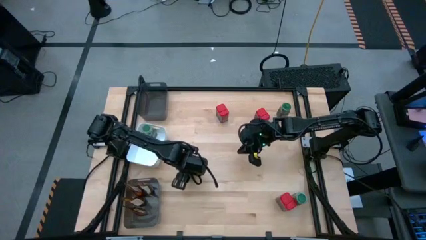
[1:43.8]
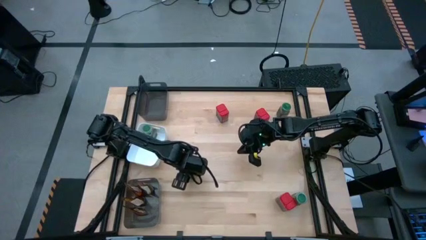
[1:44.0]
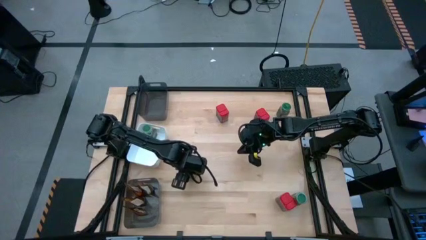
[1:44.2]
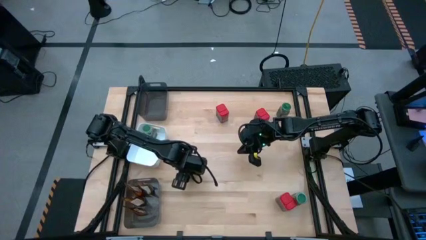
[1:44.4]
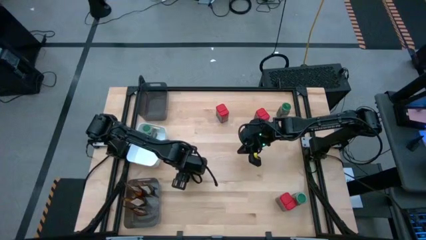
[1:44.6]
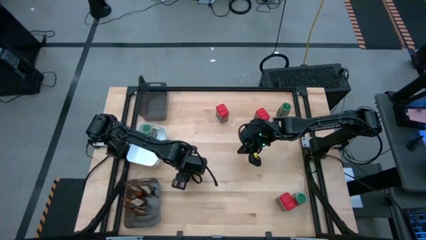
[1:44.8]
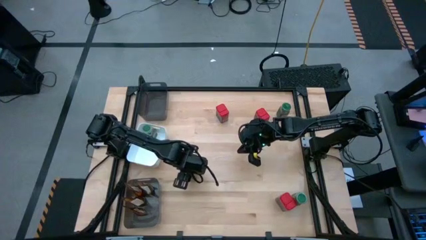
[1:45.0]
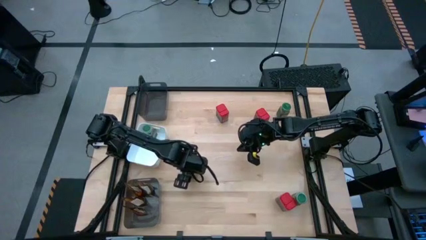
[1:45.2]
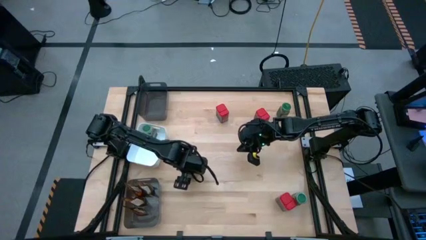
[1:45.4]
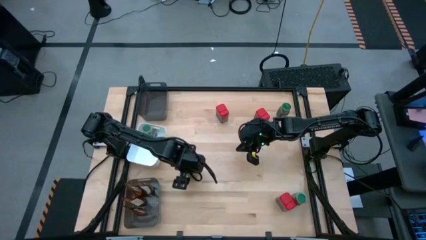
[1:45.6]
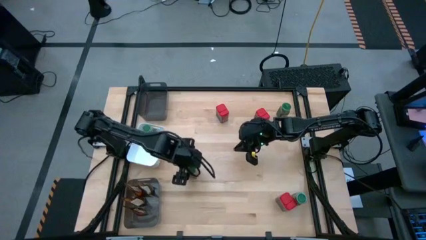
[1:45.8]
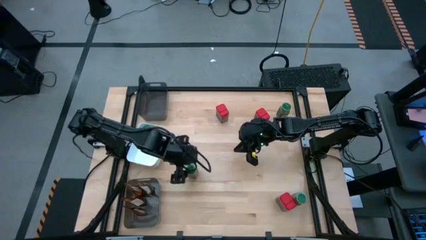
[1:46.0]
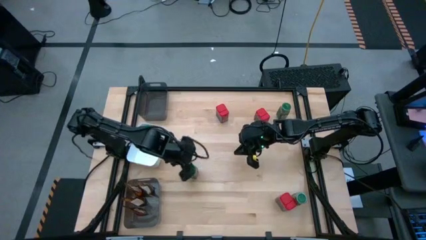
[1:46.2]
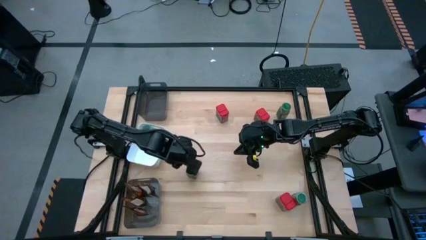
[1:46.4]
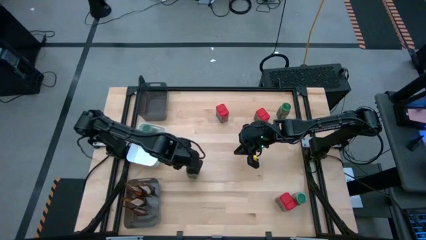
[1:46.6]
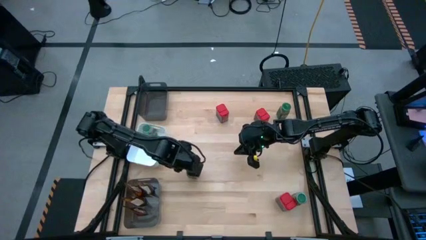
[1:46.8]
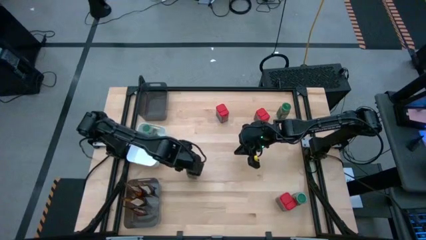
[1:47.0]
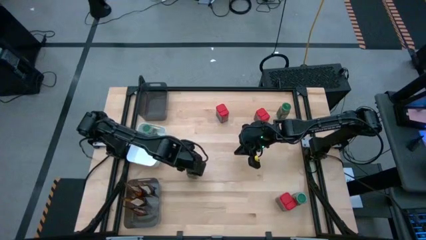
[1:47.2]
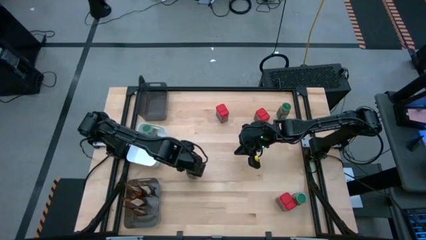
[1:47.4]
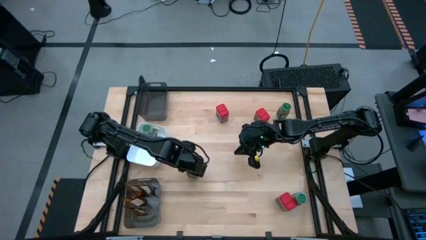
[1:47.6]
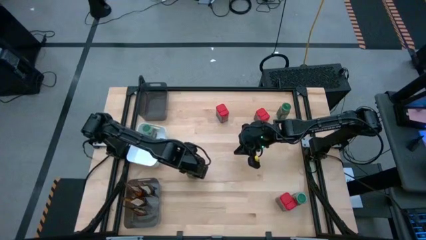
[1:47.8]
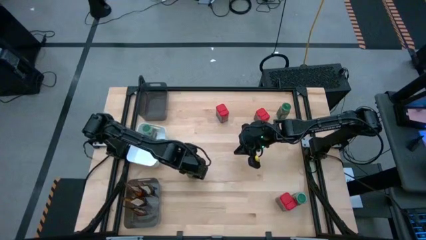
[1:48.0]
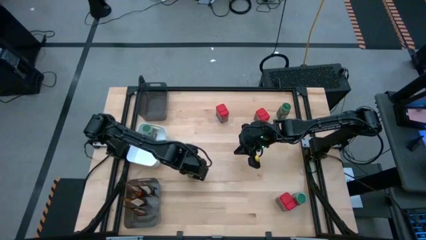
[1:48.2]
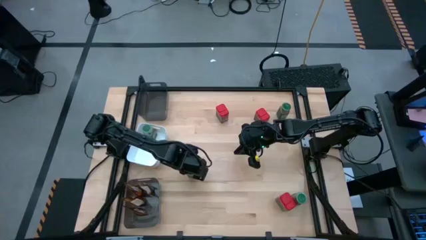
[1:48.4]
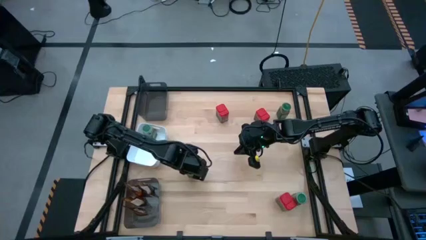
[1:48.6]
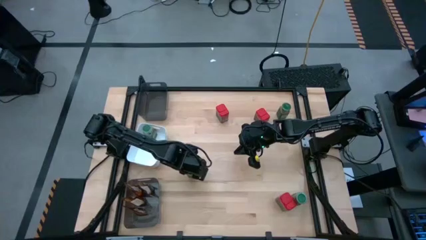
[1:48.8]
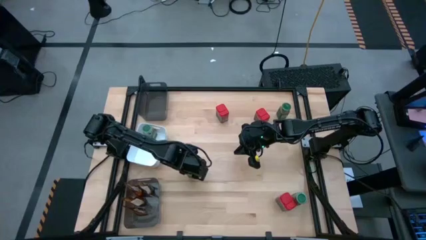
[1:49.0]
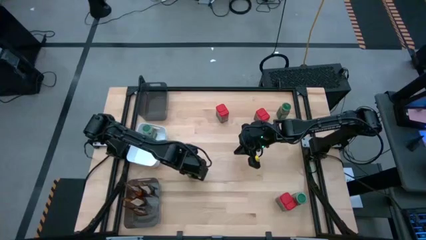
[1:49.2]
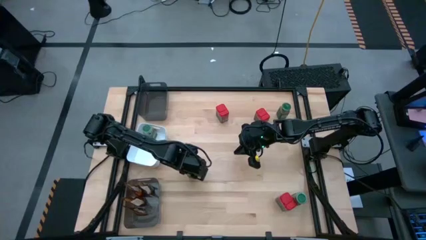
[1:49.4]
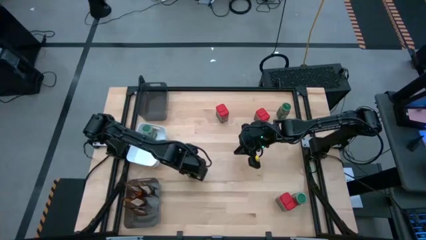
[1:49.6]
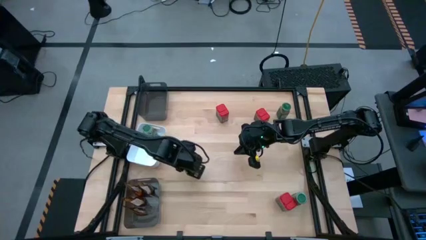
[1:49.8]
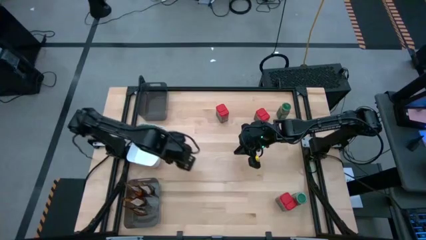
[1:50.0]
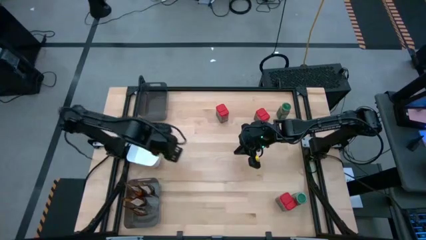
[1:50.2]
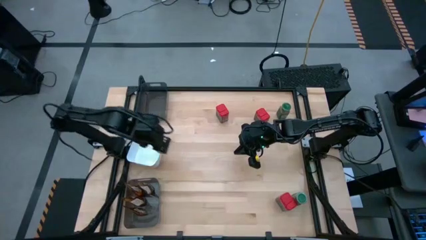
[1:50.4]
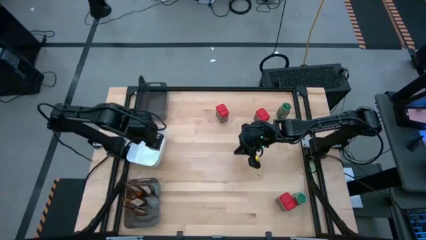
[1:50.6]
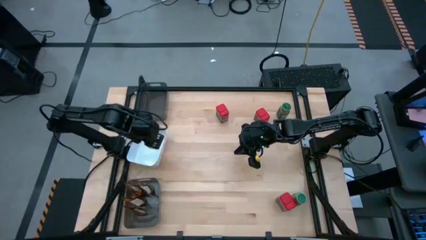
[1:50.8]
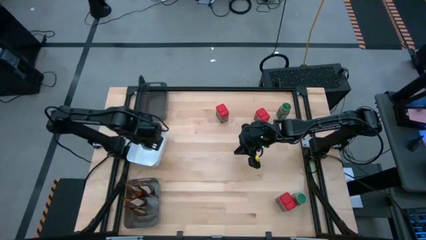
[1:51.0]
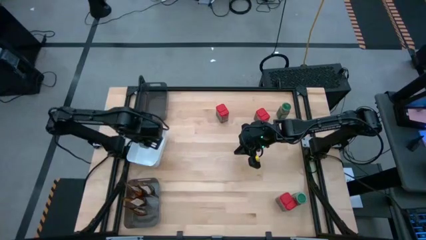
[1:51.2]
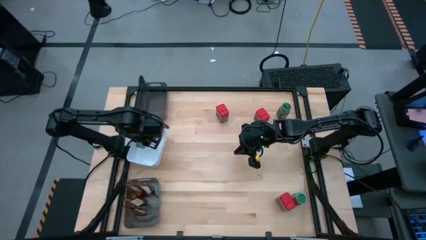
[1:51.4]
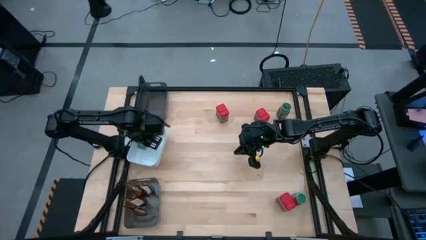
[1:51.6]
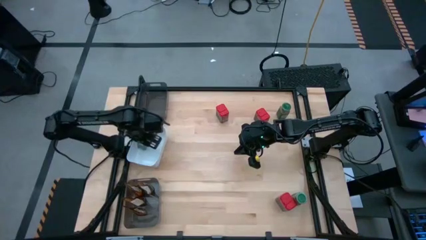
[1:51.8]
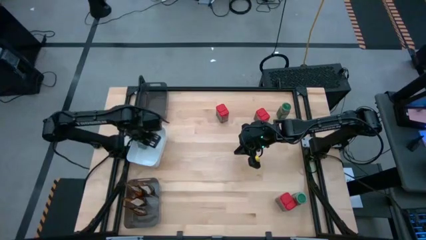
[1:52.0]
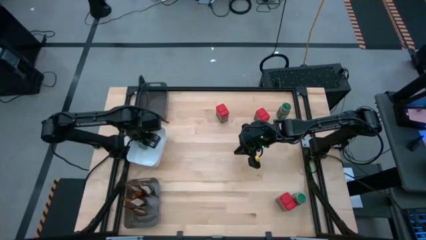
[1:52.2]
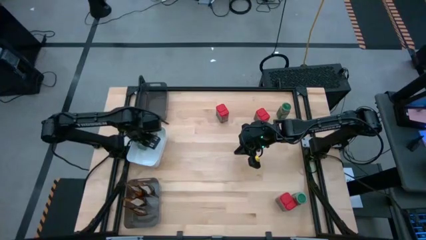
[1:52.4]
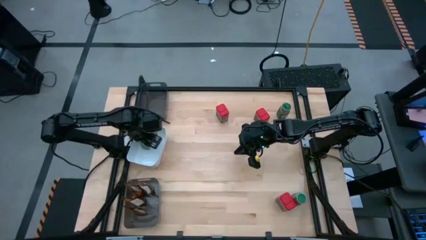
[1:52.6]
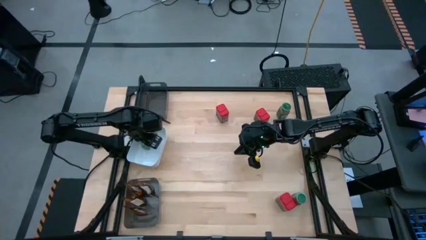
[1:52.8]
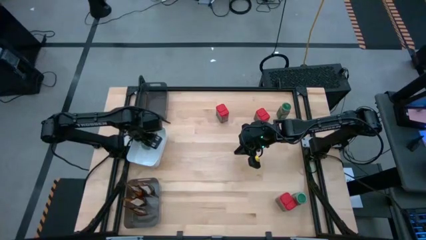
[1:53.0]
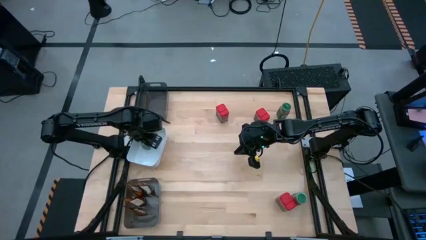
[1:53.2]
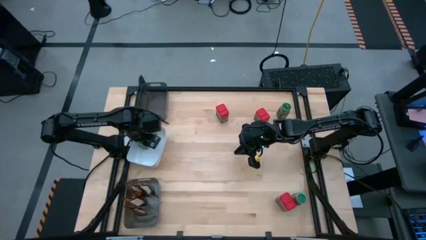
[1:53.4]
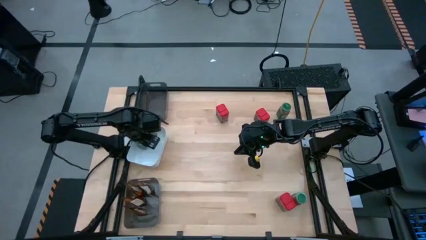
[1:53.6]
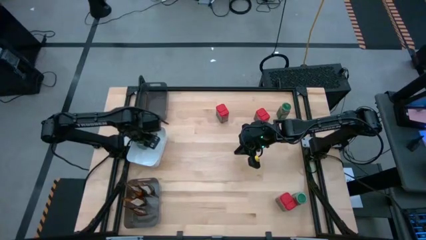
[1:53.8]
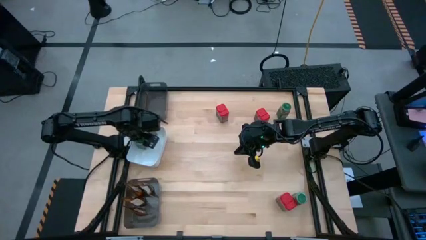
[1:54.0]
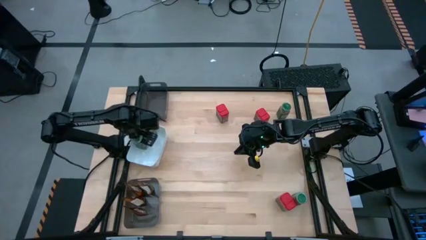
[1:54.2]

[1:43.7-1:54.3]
Task: Sort spices by type
Put the green seasoning bottle into the white bin

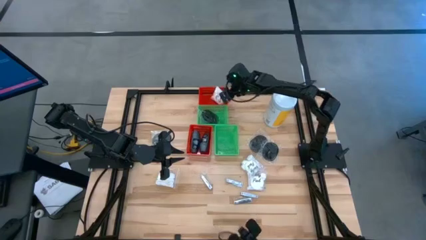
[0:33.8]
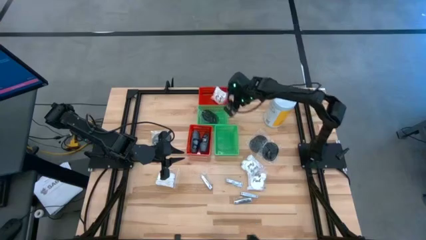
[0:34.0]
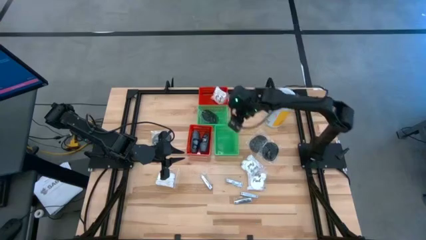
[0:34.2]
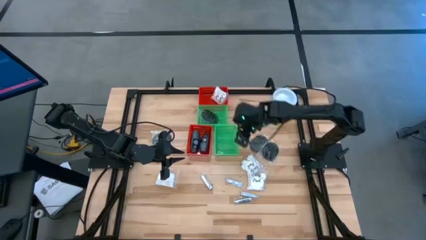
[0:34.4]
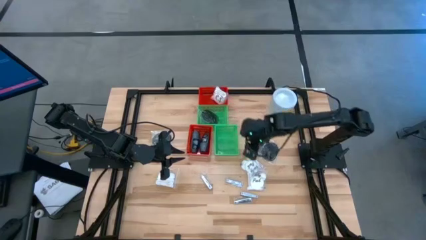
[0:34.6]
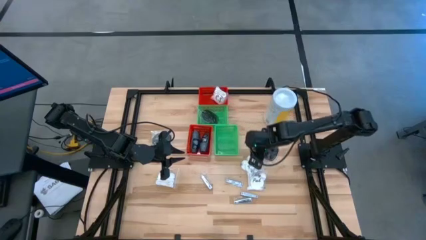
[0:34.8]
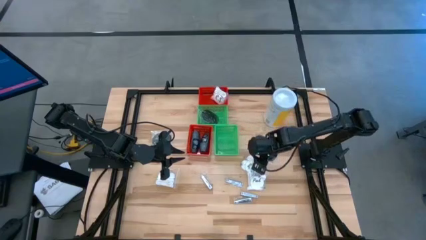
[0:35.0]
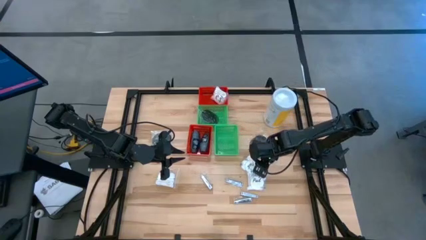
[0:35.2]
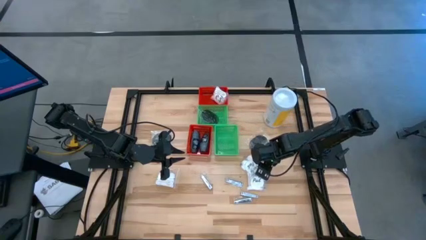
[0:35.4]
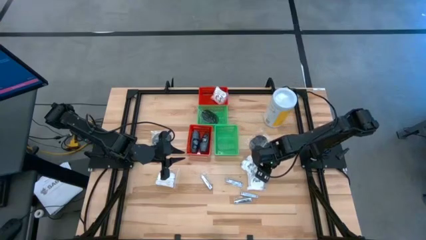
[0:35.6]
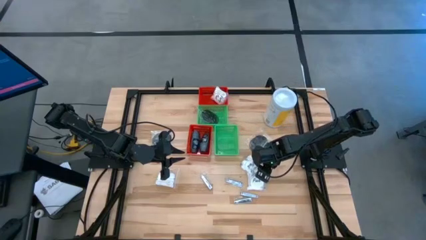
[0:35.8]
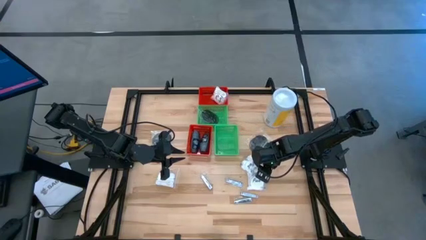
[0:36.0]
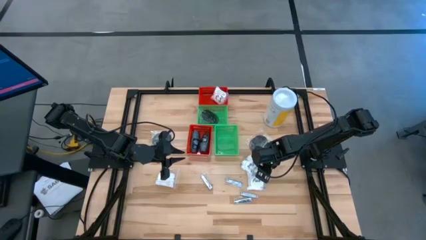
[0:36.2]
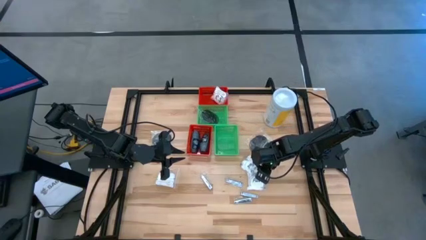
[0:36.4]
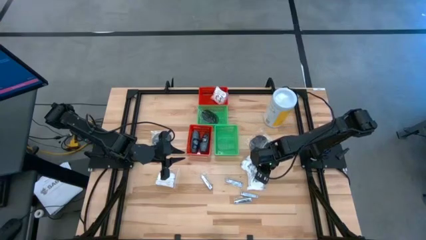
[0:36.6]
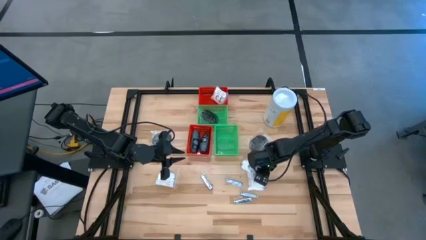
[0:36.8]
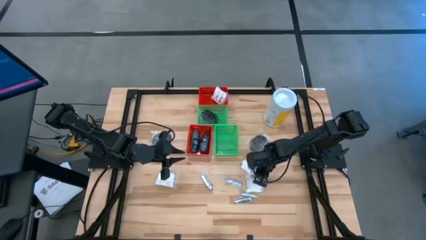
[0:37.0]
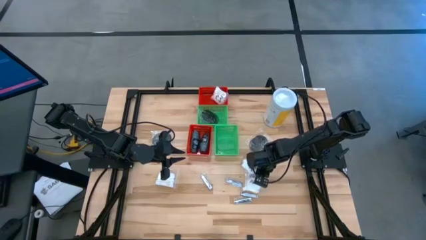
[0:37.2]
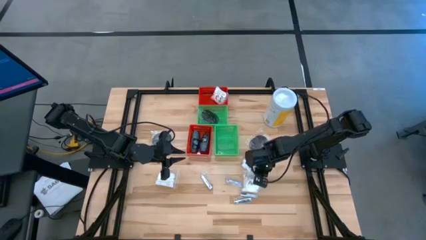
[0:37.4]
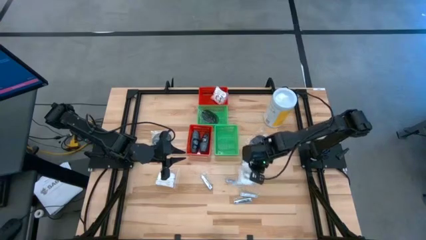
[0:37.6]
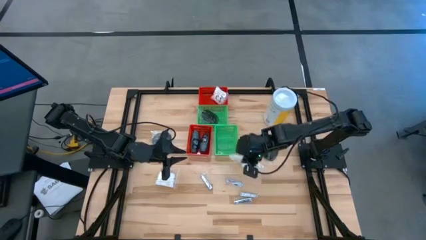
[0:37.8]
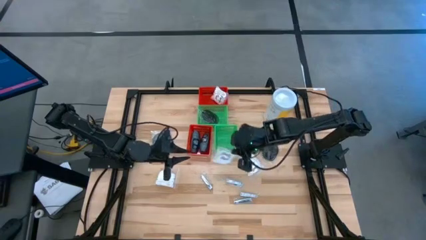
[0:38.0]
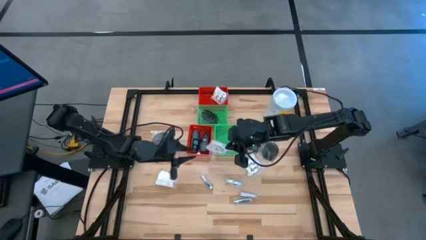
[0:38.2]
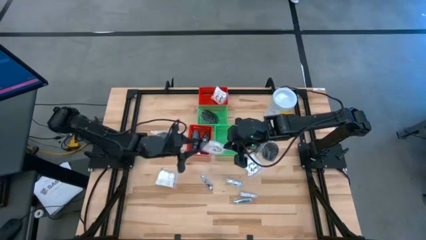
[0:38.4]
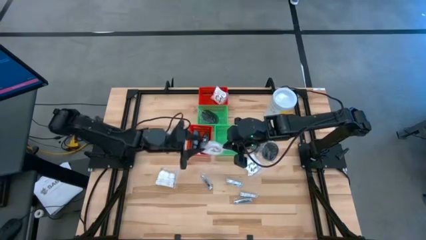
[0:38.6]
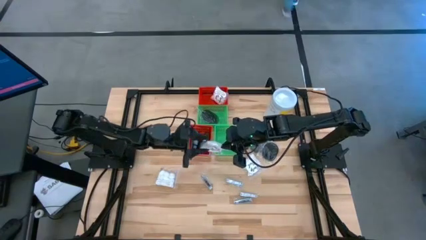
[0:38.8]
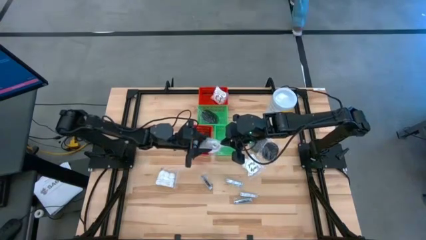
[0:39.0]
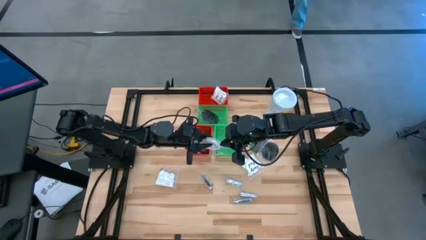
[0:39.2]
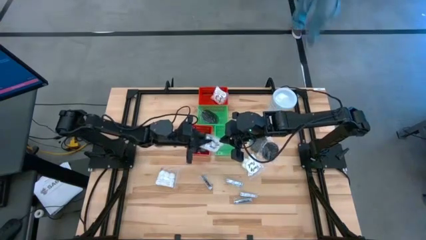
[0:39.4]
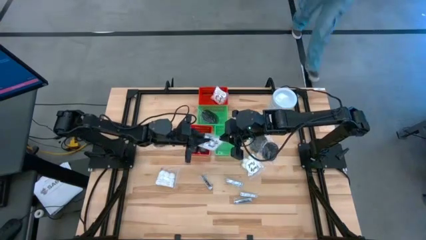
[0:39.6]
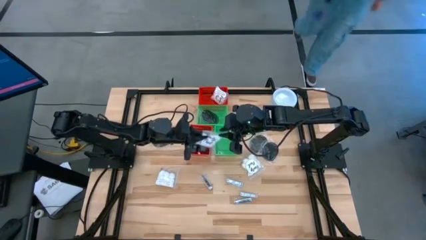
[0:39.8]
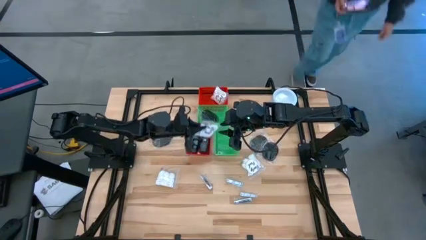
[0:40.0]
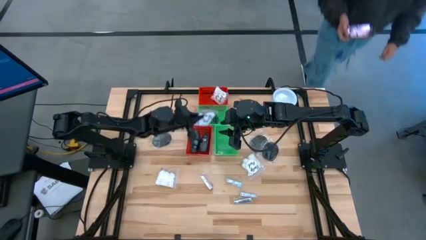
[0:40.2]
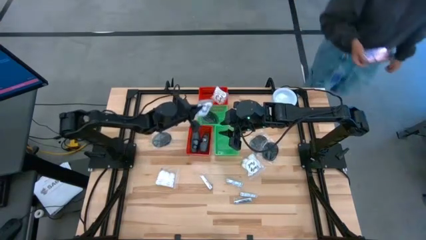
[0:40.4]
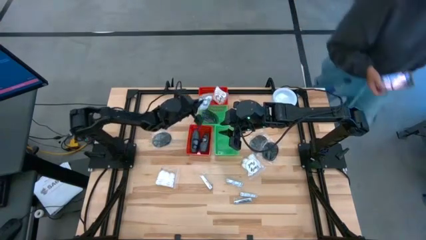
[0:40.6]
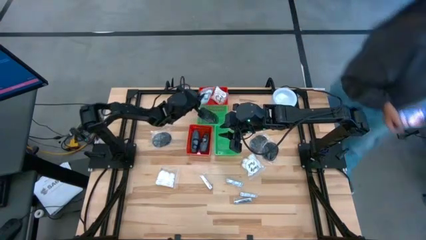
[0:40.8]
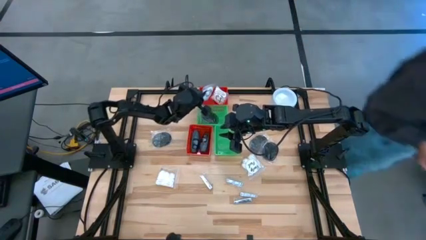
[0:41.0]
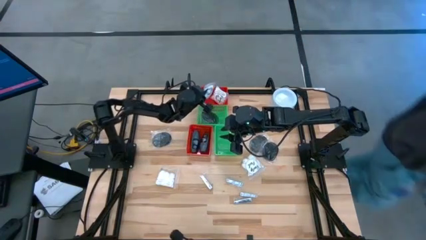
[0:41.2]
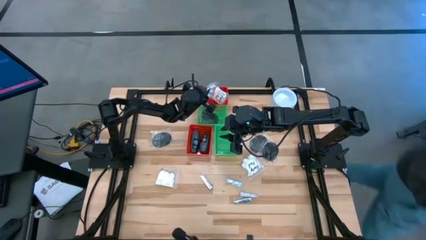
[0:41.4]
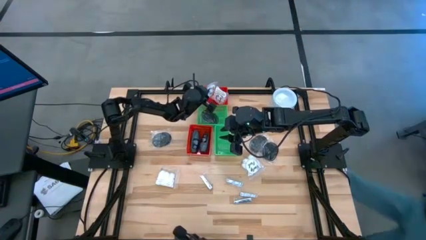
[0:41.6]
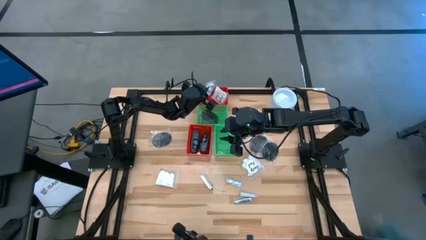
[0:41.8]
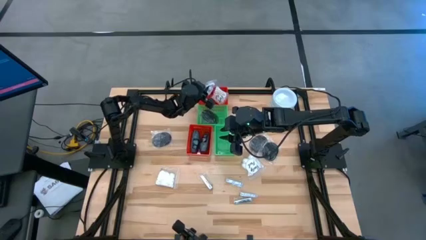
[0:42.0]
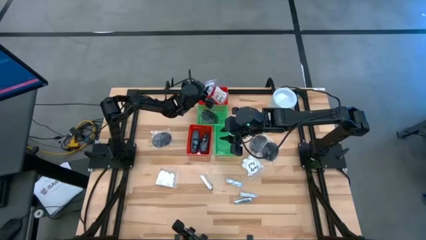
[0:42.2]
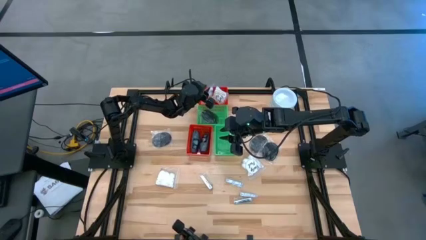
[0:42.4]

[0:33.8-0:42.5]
Task: Pick & Place Travel size toiletries
Put the white cotton pack into the top red bin
